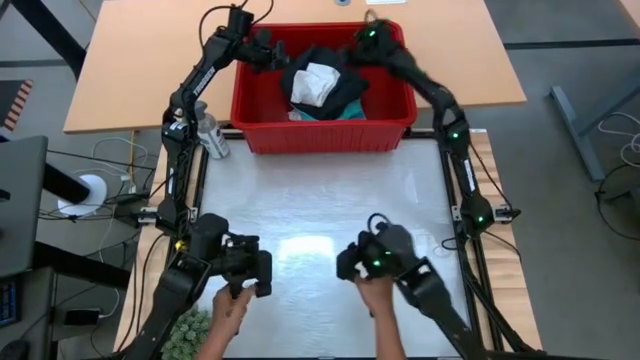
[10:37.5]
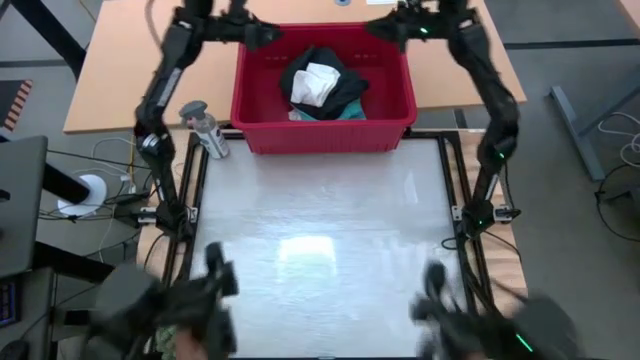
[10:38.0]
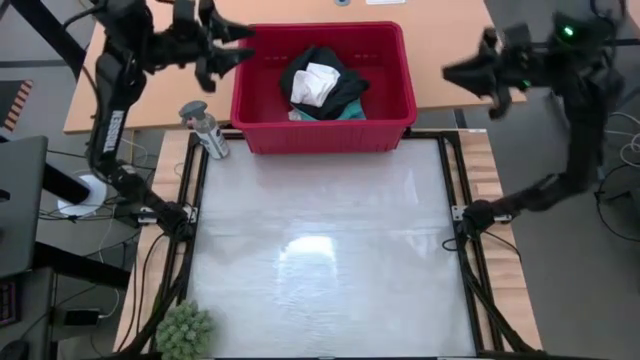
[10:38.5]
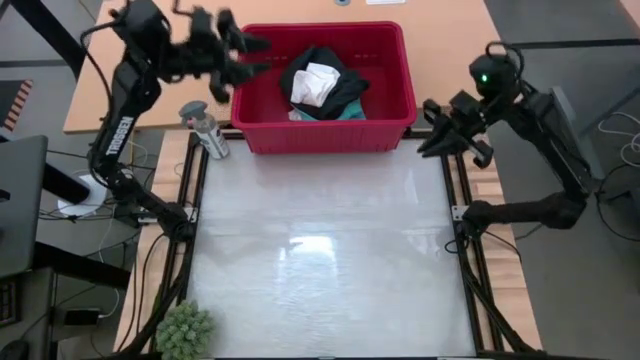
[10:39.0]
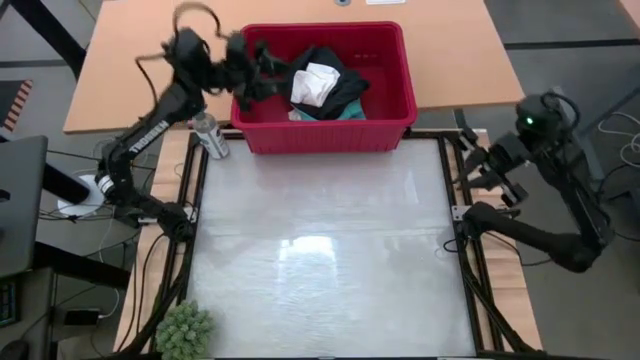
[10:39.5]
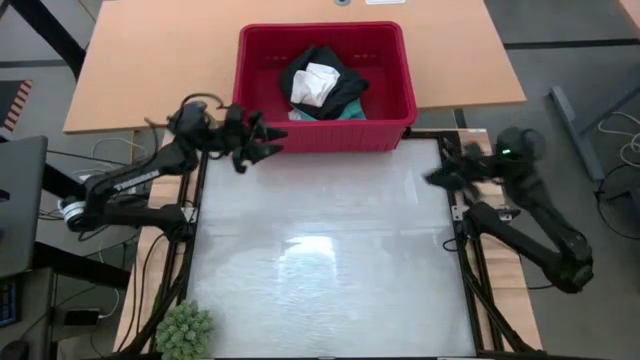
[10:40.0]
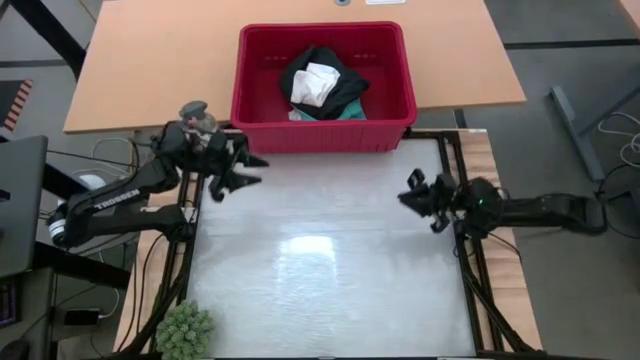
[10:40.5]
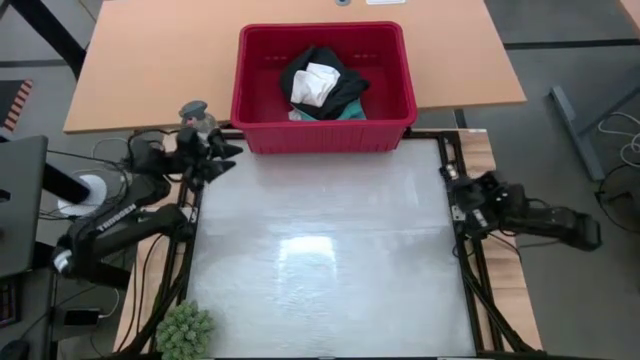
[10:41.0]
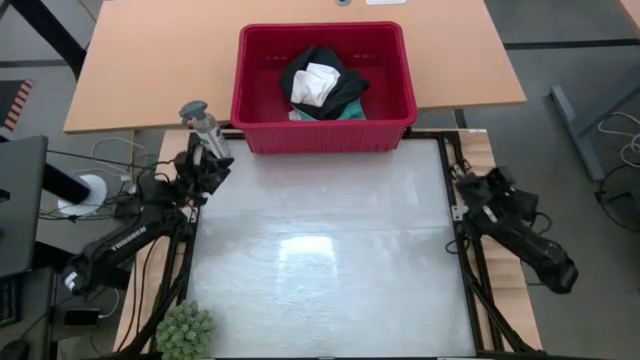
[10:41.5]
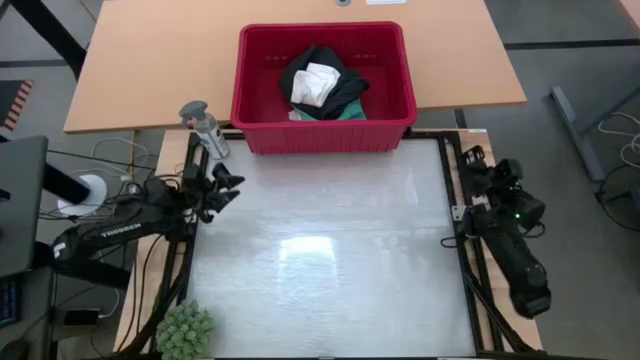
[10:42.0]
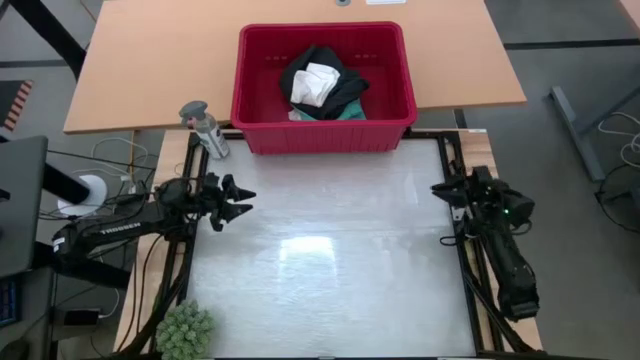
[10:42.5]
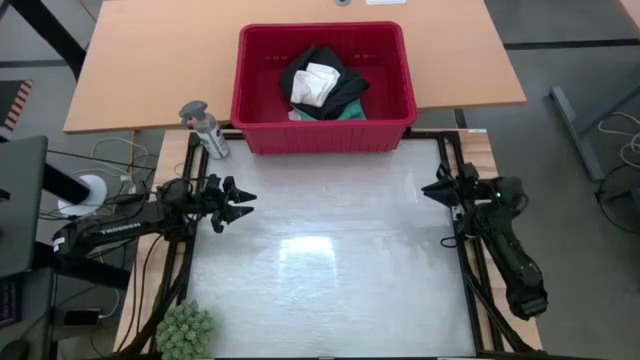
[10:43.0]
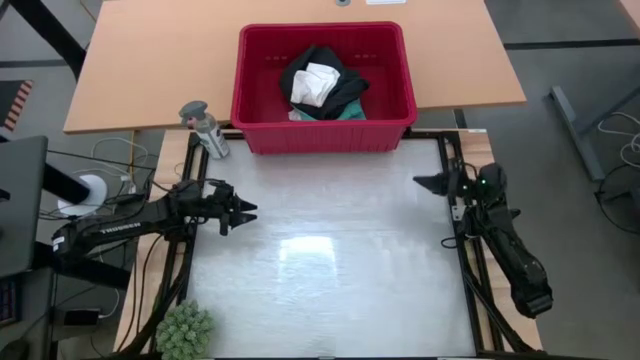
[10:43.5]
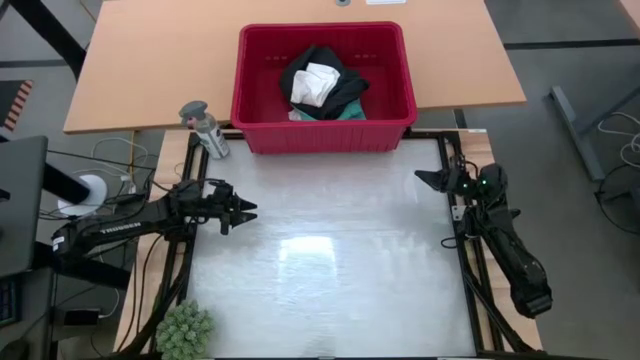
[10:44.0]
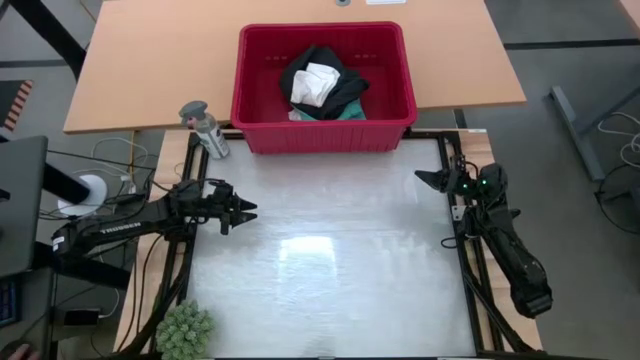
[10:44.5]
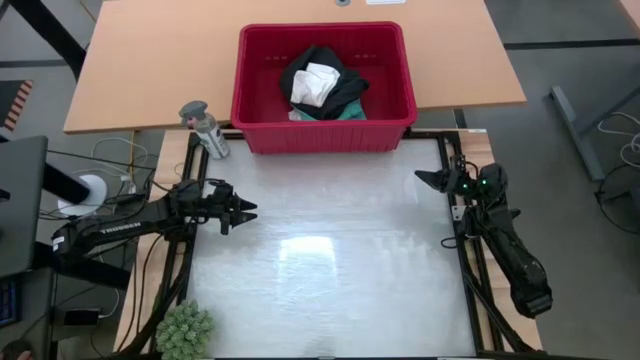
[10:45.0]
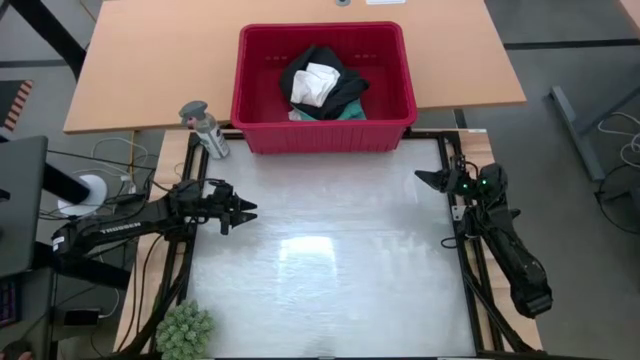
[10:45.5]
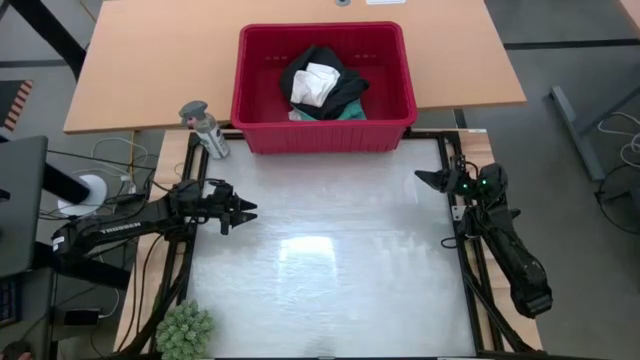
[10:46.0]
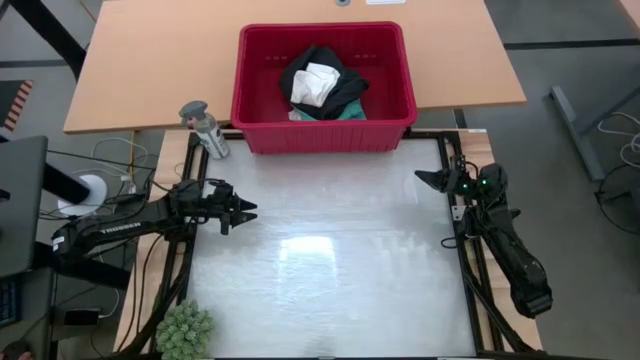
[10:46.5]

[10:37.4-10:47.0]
Task: Fold Laundry from Bin
Return to Home Position
